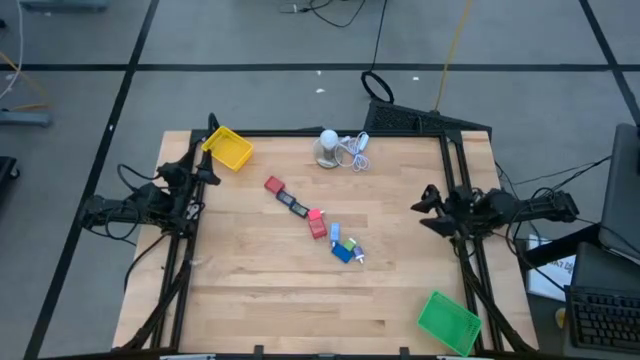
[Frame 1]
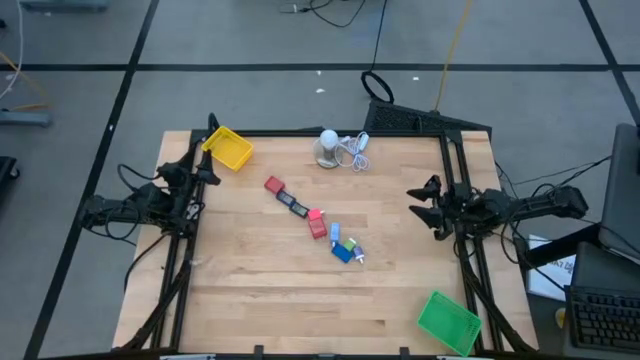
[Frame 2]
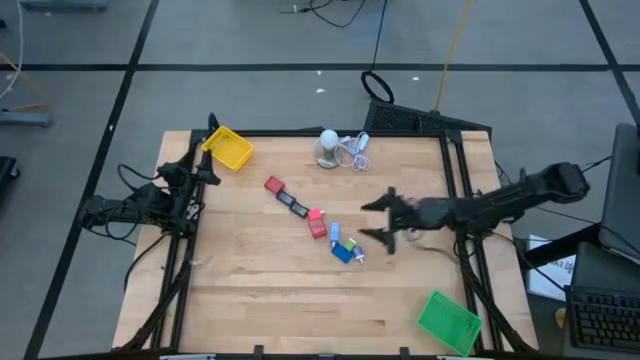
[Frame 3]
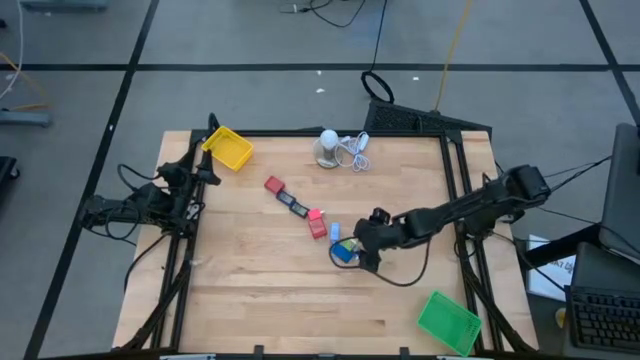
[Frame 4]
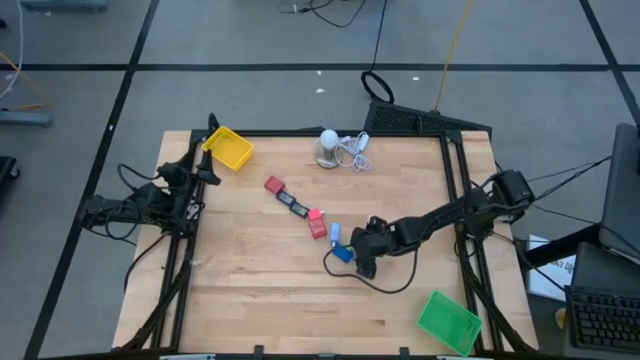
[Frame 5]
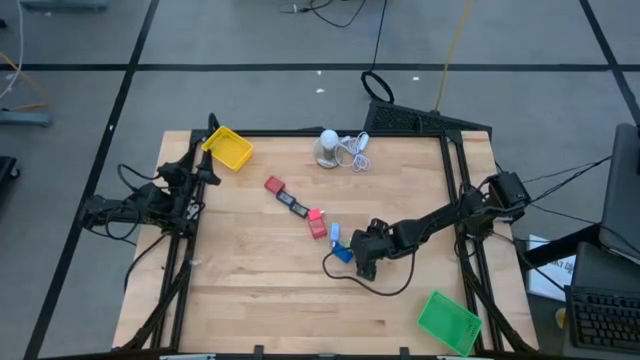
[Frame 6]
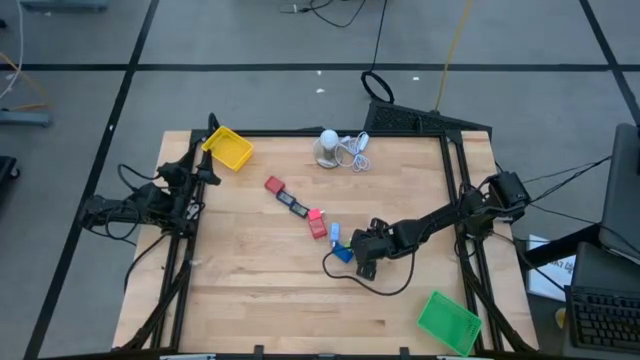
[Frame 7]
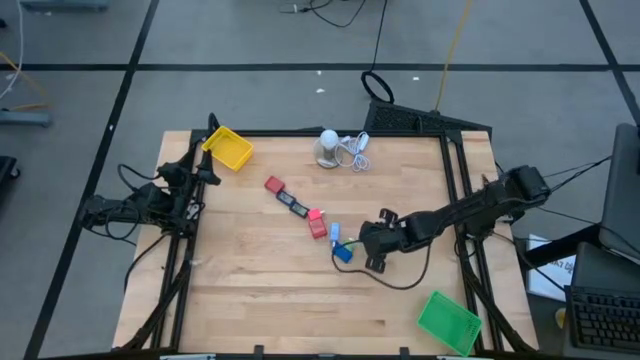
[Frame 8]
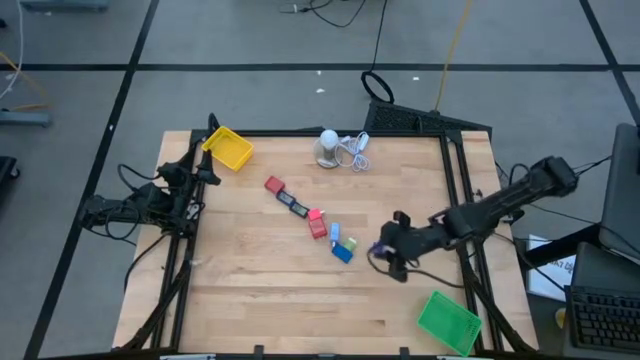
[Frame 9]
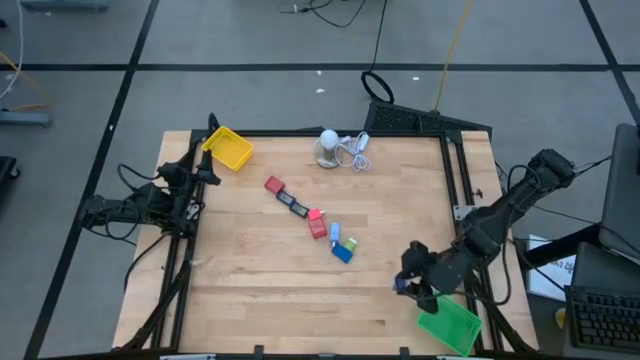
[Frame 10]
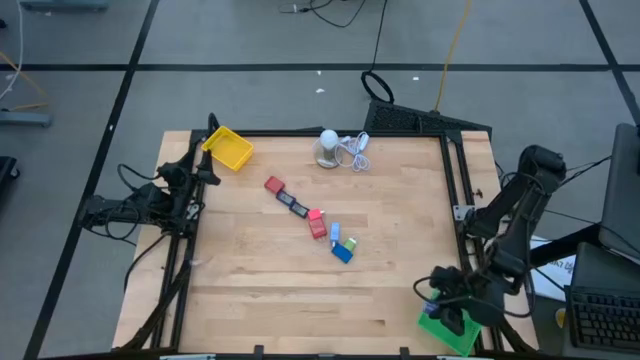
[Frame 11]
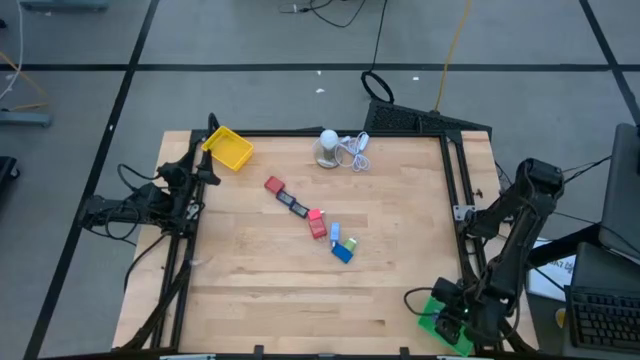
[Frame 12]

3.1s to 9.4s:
Task: Pick & Place Office items
Put the blue charger adapter into the green bin

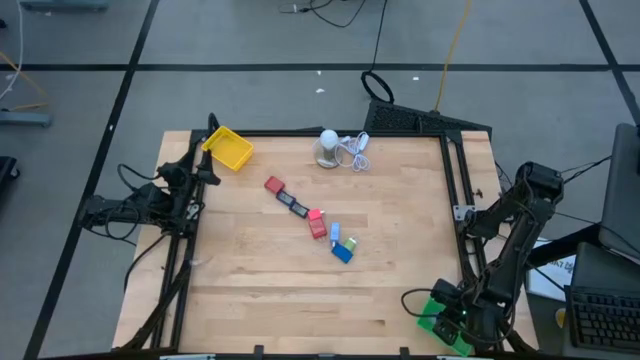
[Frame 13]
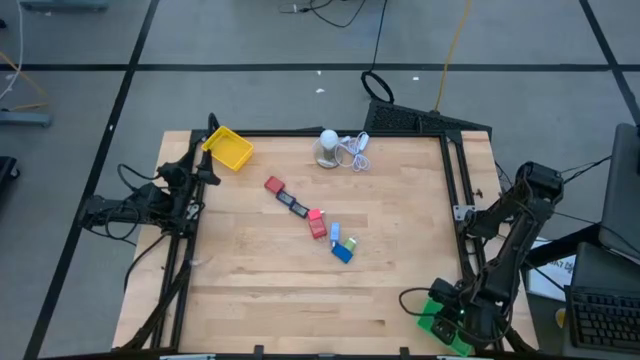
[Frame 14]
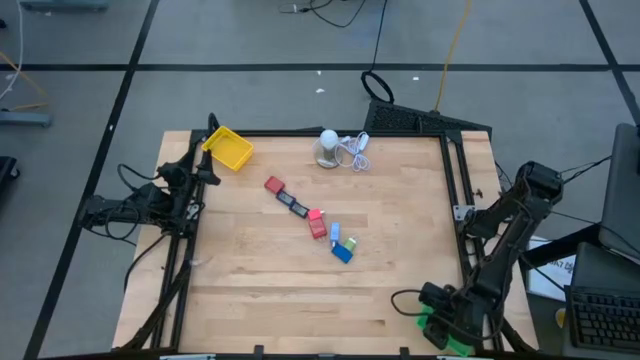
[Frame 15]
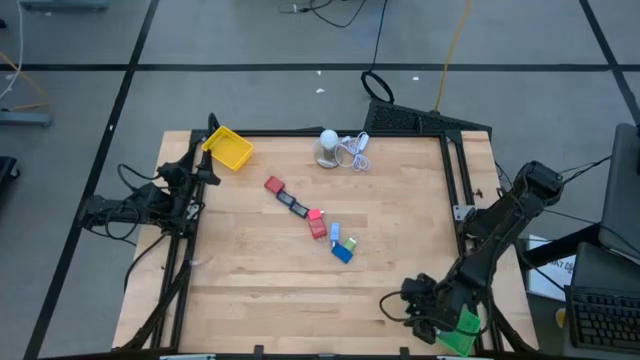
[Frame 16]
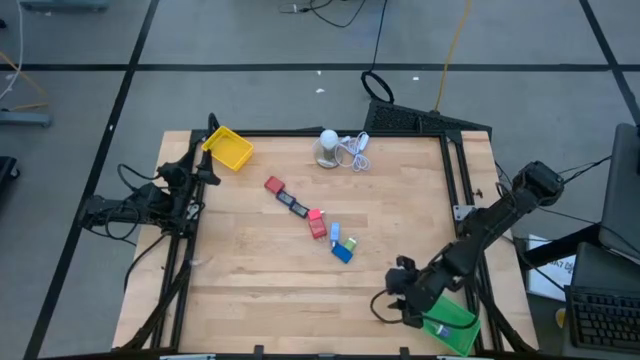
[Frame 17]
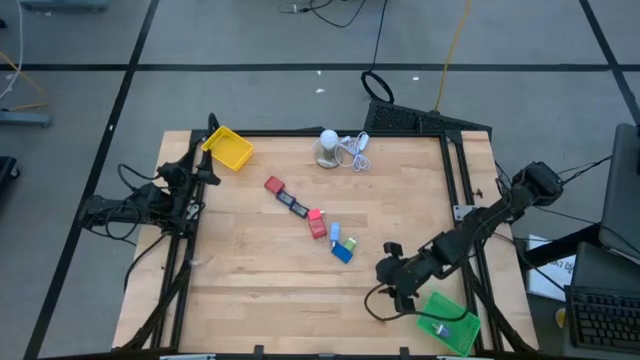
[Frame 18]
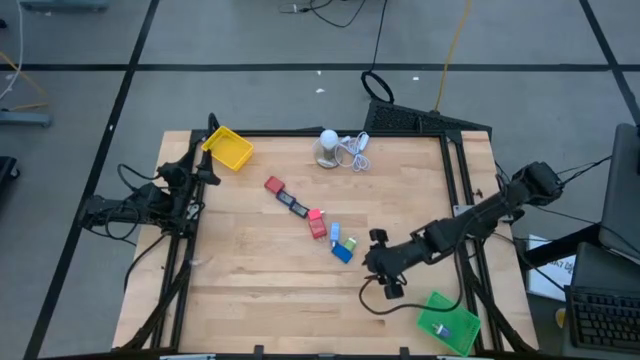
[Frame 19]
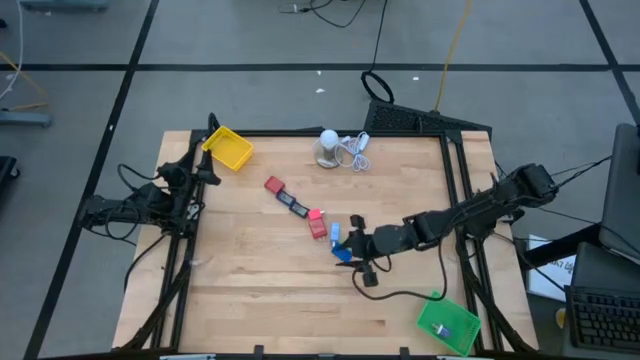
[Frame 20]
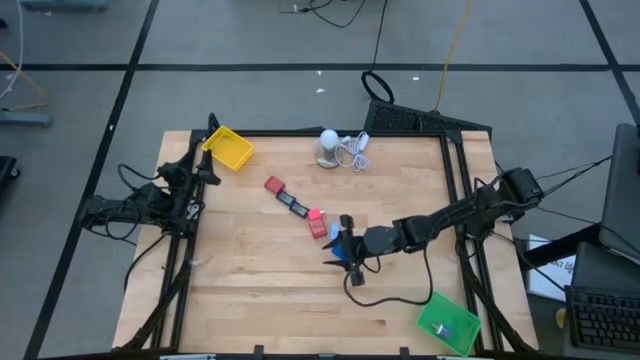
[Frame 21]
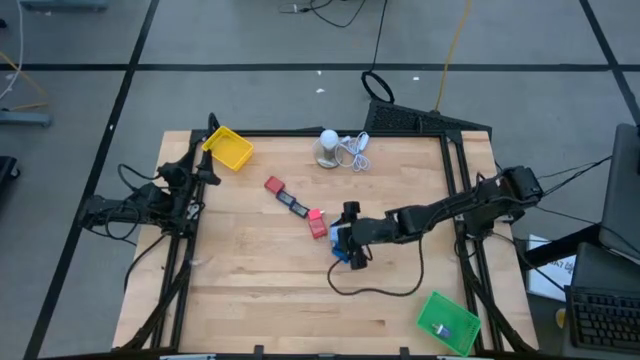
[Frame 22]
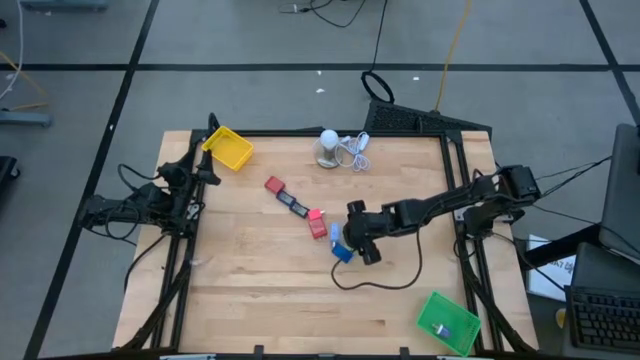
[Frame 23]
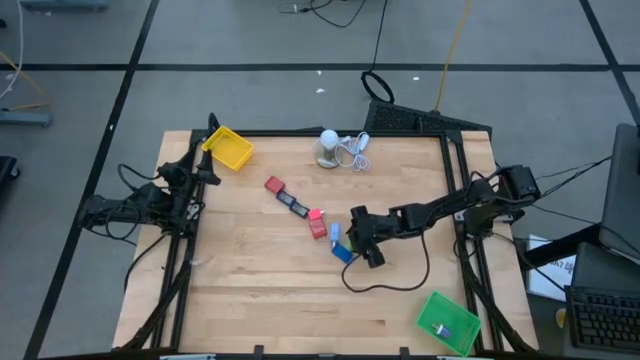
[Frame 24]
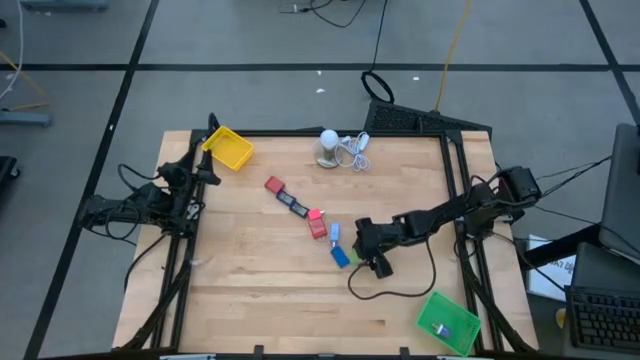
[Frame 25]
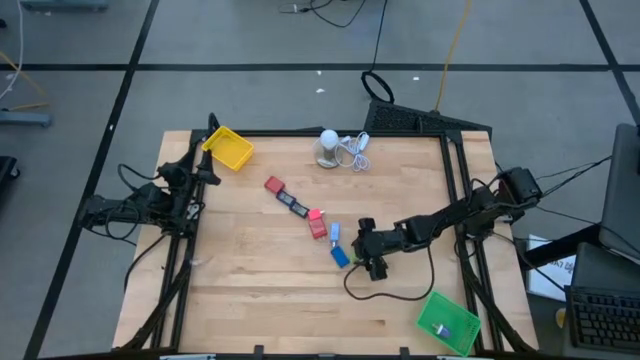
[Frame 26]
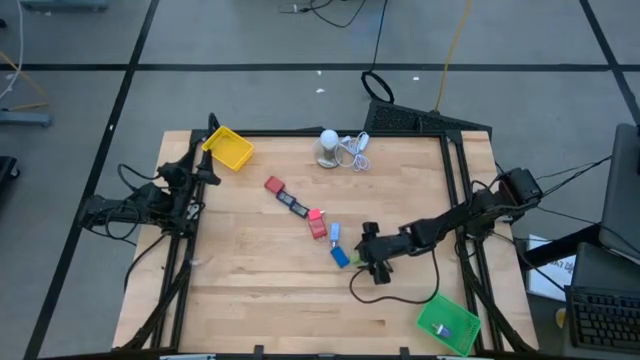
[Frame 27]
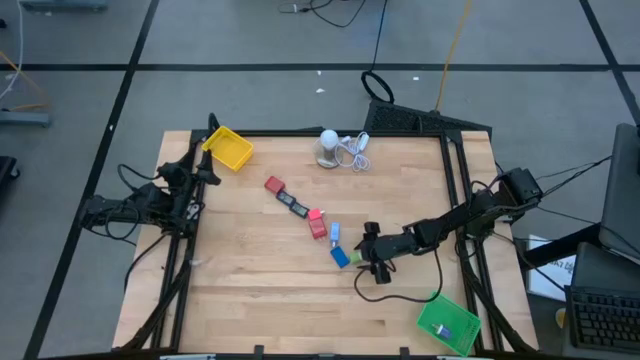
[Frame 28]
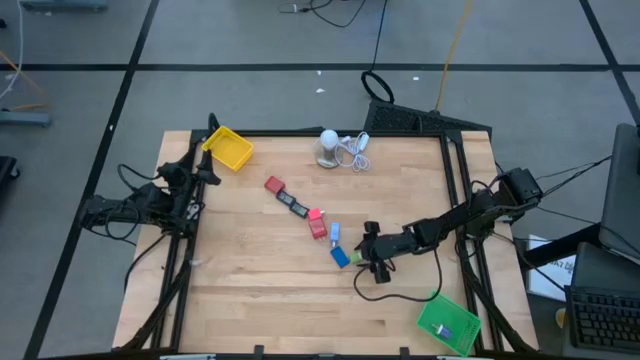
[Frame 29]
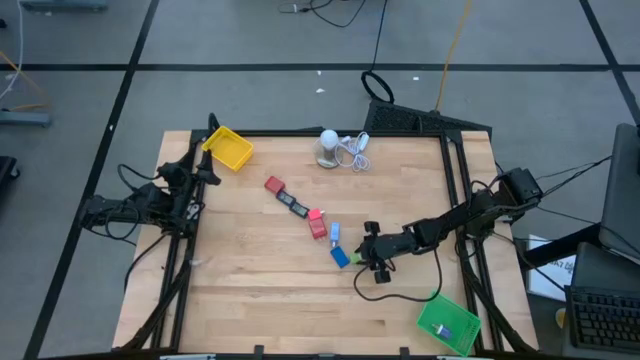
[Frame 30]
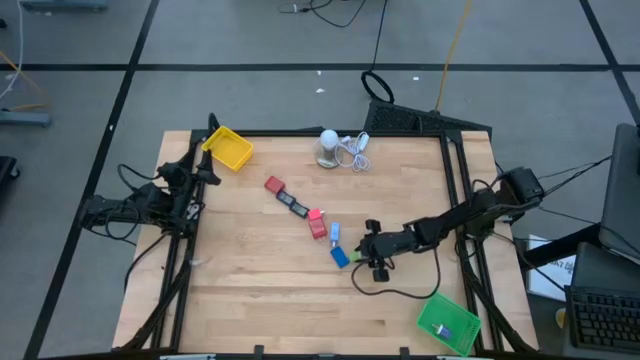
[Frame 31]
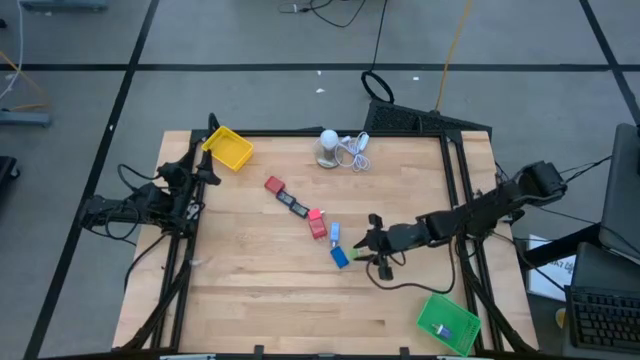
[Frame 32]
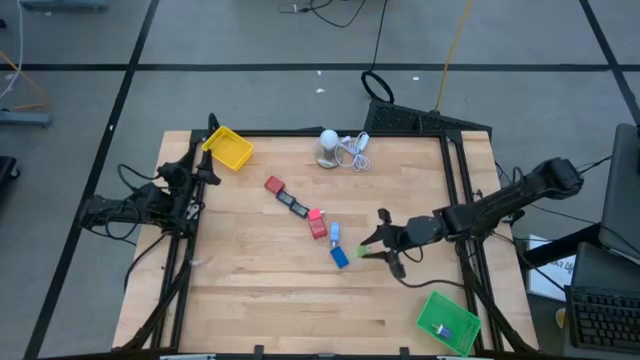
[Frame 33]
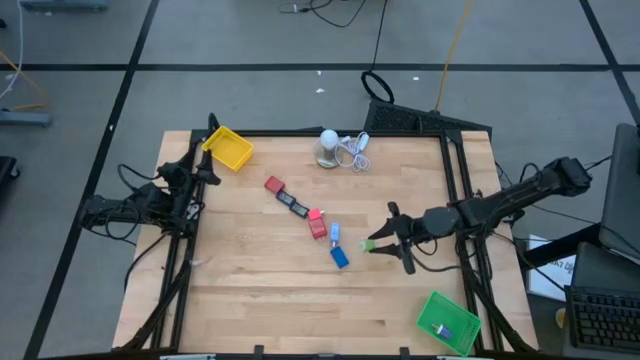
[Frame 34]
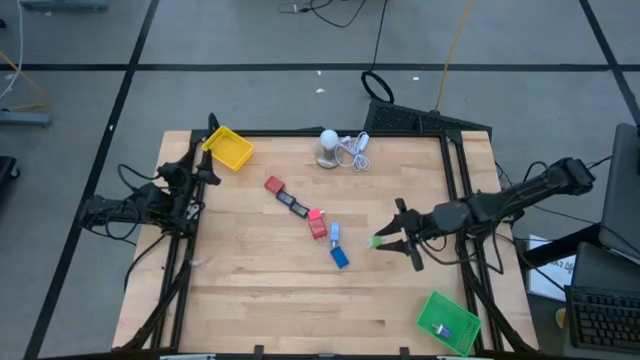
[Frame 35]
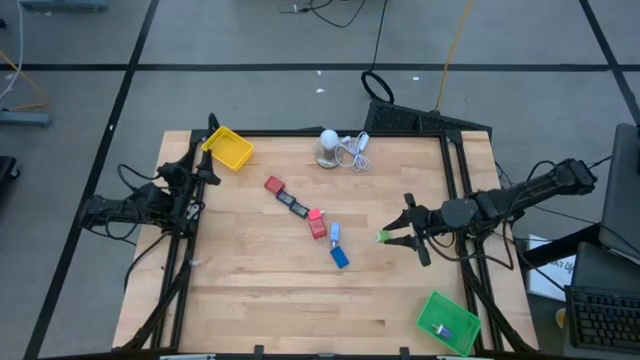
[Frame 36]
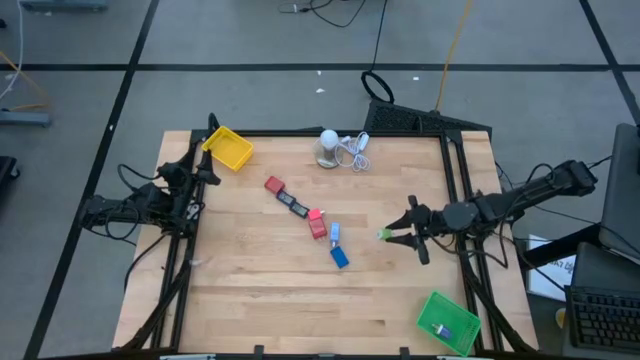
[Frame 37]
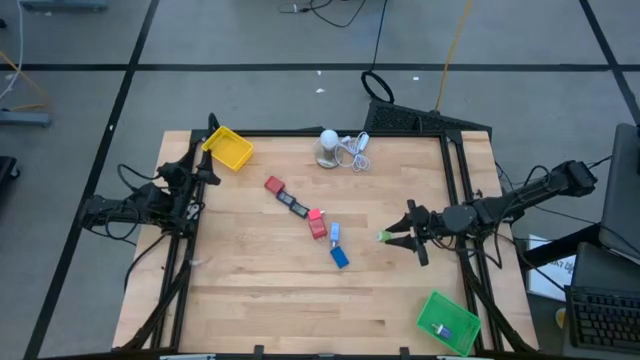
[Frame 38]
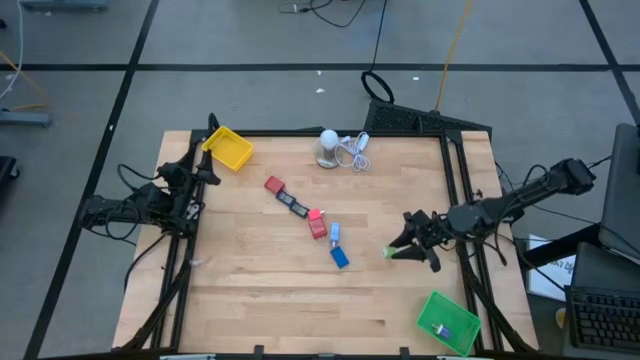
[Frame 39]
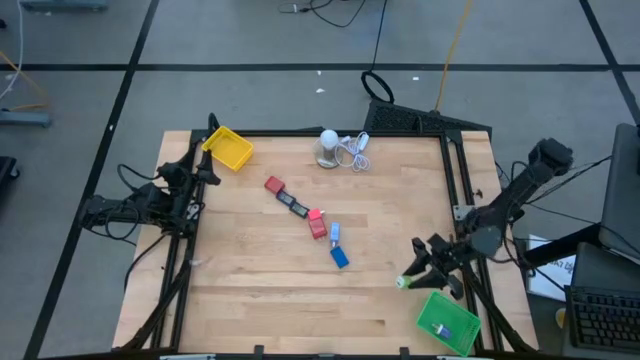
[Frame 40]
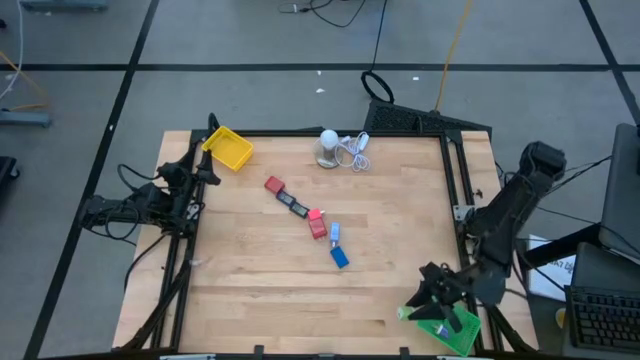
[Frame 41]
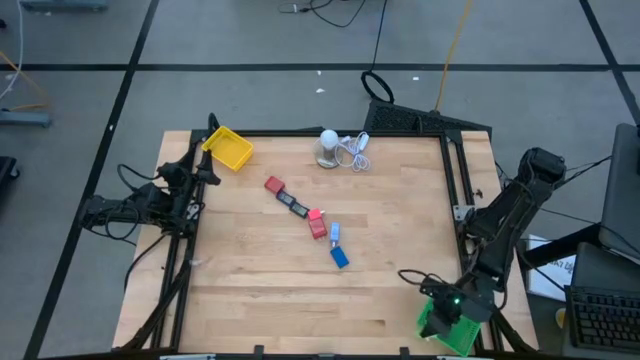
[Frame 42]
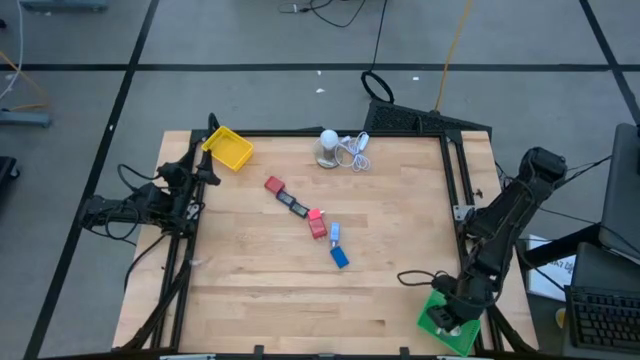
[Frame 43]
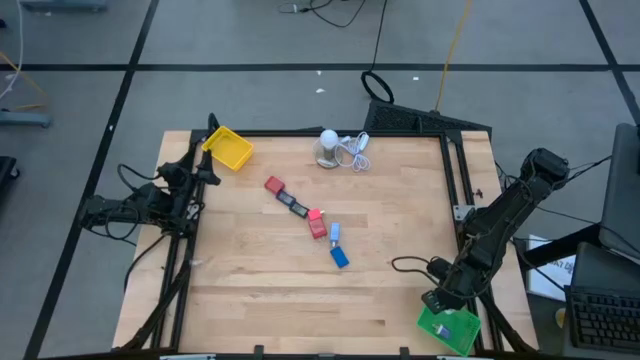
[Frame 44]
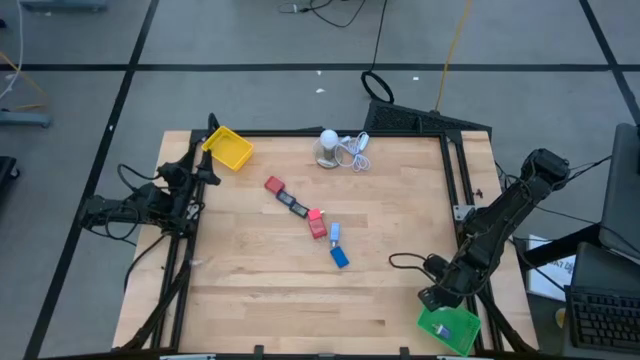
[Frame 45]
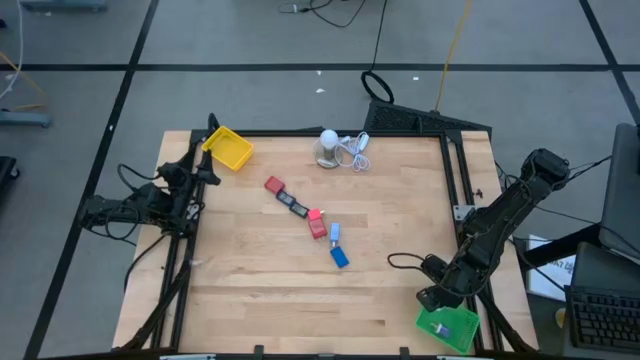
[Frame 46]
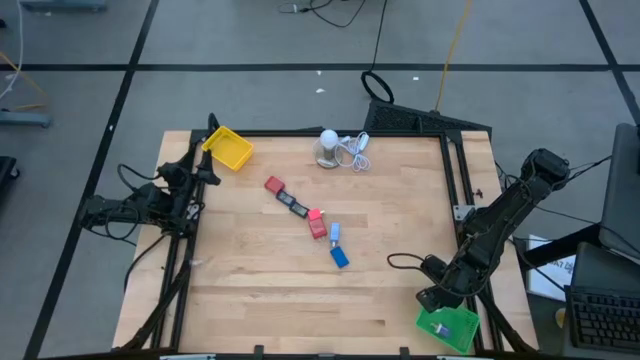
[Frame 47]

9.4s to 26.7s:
Put the light green charger adapter into the green bin
